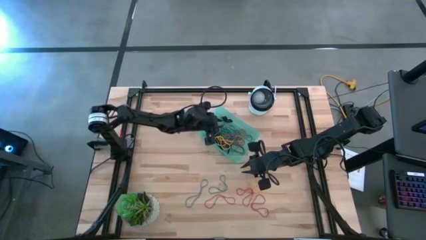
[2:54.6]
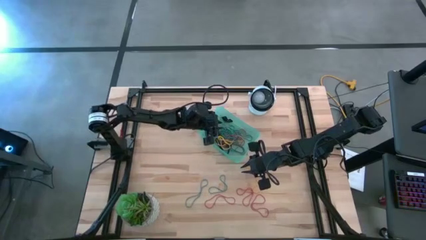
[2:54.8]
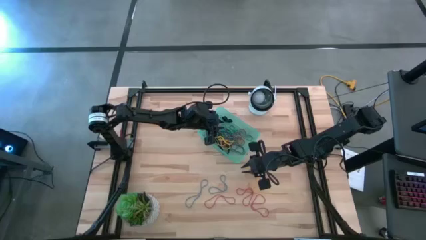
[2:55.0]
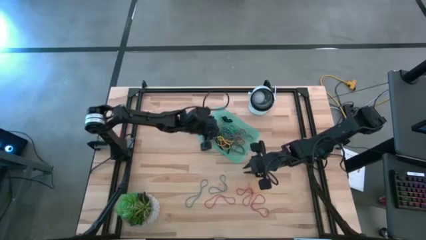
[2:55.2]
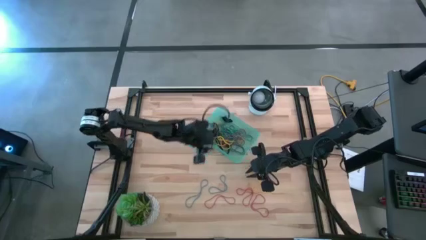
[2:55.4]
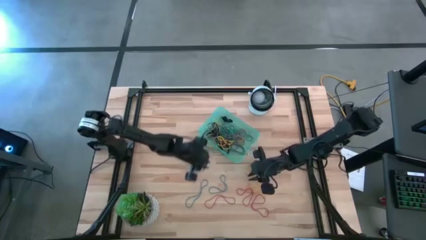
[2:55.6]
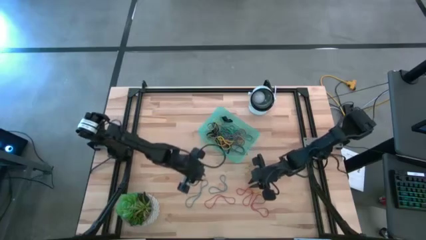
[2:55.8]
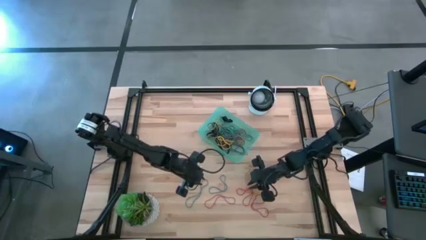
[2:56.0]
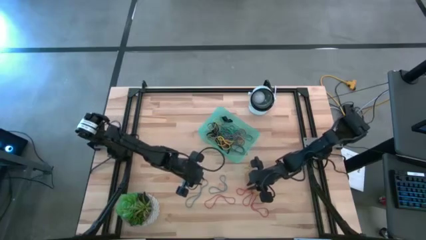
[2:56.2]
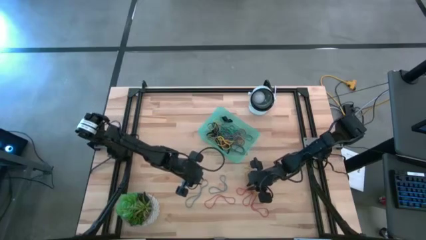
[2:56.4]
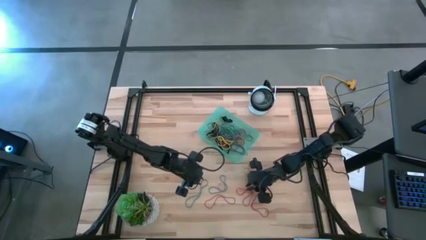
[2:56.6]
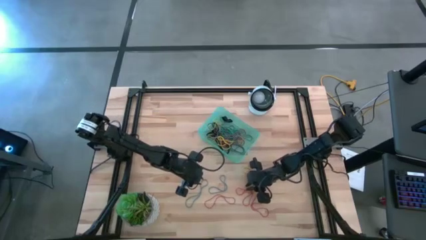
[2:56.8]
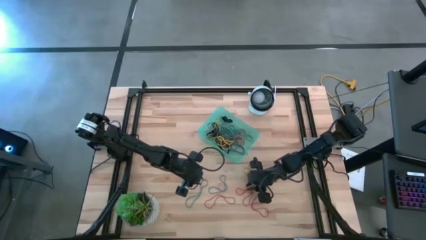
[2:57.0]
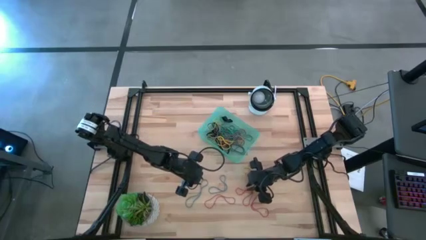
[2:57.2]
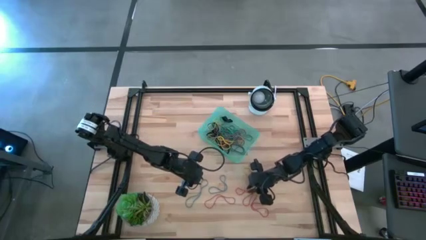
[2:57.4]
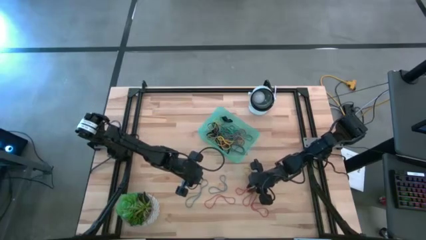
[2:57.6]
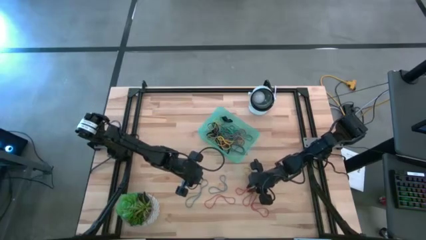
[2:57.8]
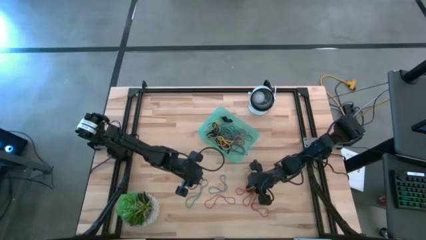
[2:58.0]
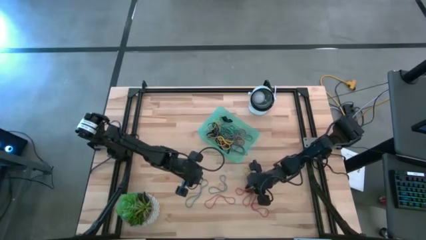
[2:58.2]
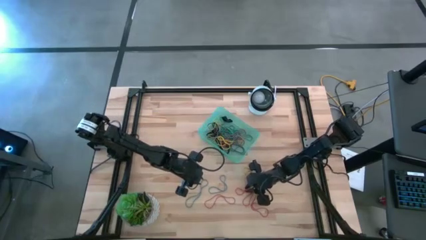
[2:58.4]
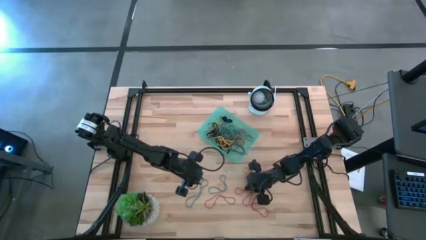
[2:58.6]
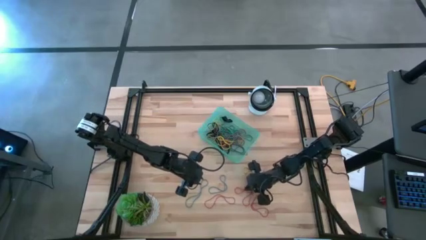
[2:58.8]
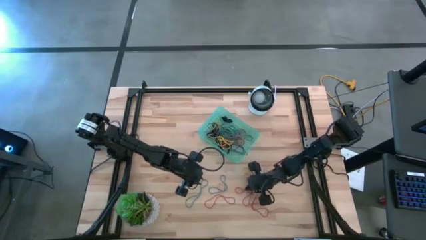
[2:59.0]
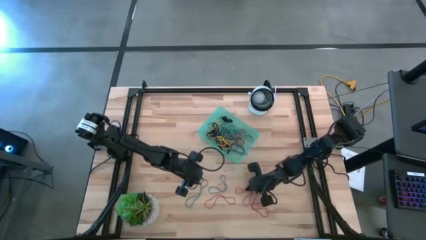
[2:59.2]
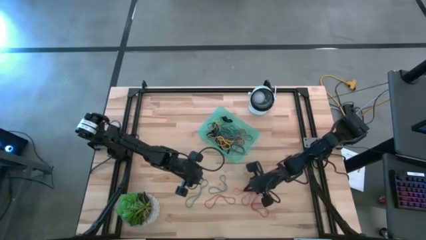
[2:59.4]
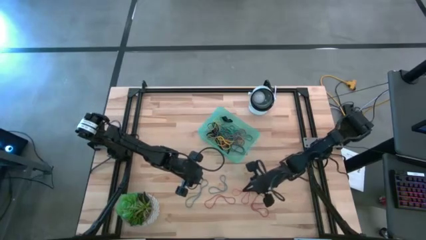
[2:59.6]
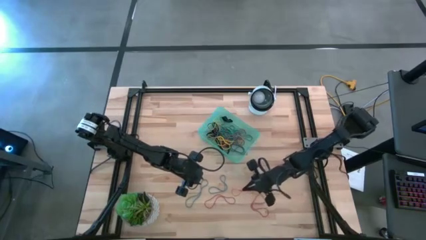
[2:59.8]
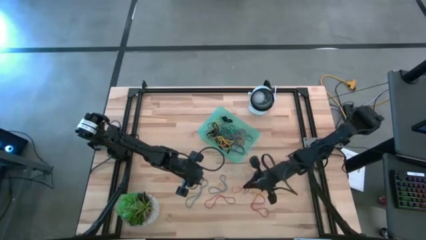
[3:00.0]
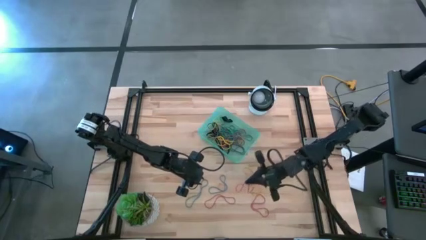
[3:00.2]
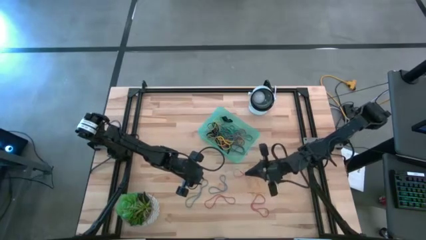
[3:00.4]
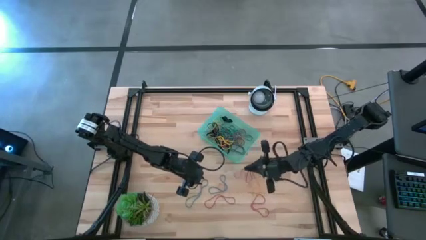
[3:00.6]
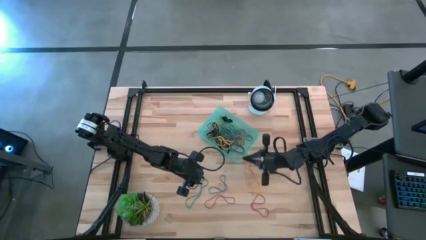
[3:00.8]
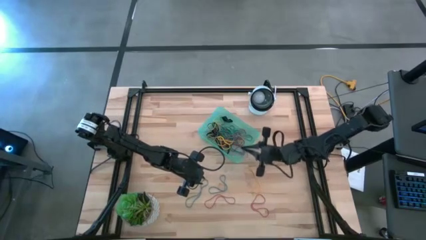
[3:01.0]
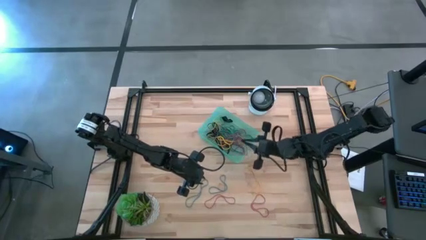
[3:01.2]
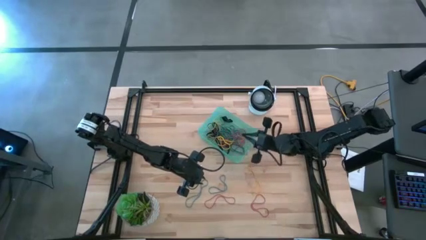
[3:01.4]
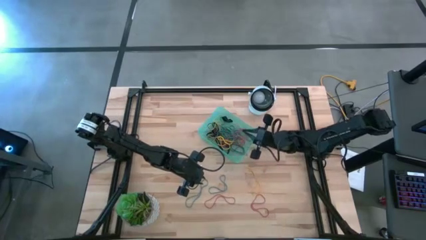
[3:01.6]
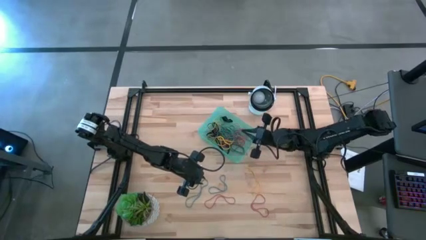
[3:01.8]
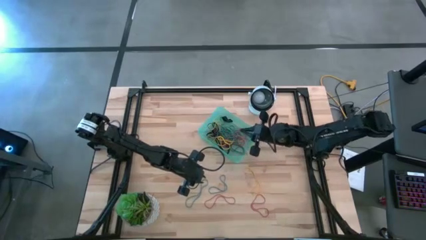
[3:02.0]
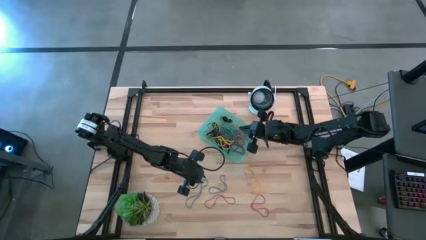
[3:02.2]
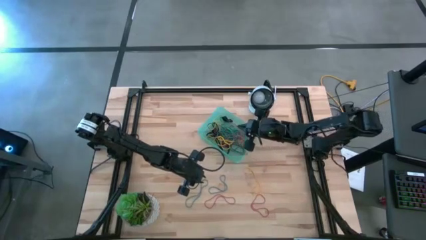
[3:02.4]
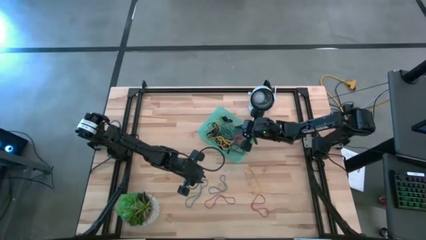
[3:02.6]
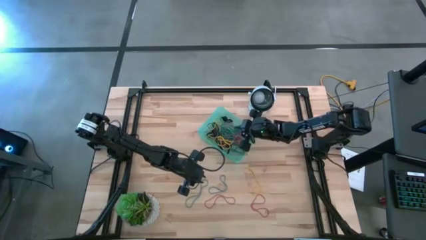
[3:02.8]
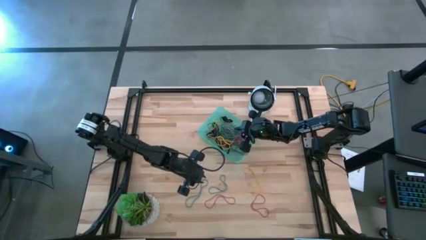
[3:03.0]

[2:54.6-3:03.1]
Task: Pick and place rubber bands into bin
Put the red rubber band into the blue bin

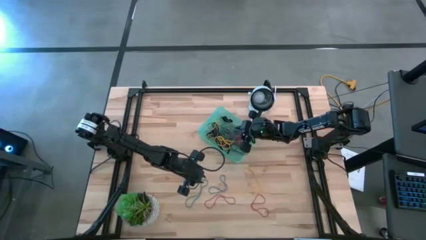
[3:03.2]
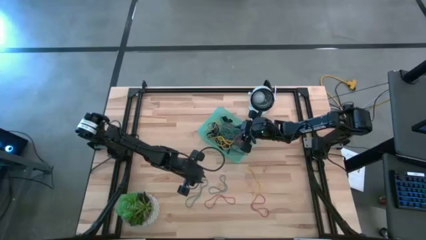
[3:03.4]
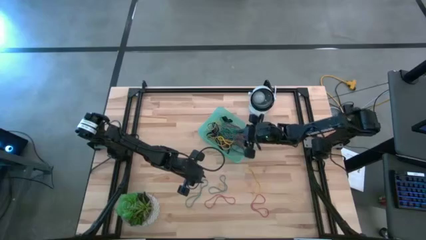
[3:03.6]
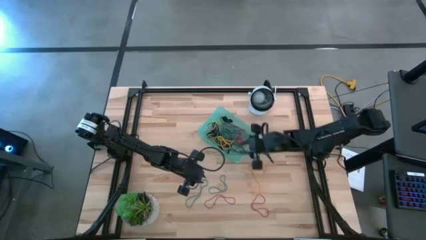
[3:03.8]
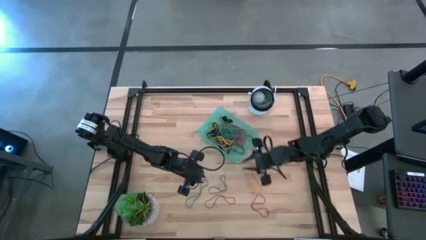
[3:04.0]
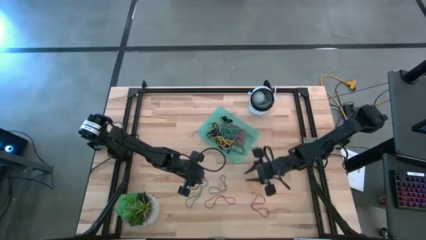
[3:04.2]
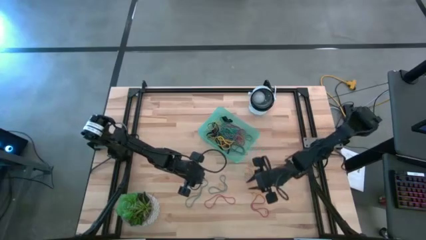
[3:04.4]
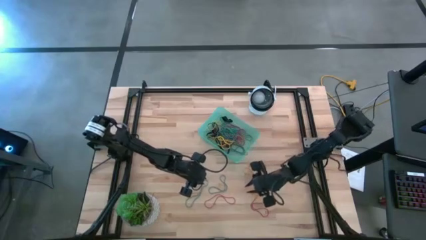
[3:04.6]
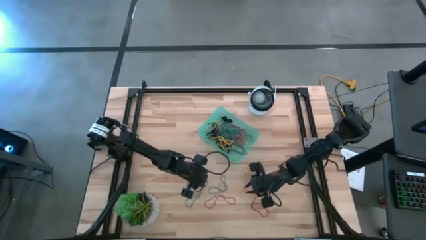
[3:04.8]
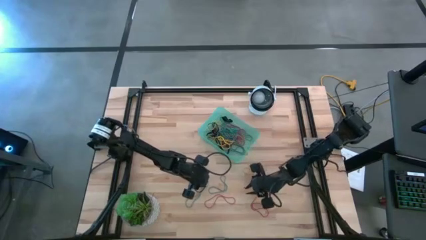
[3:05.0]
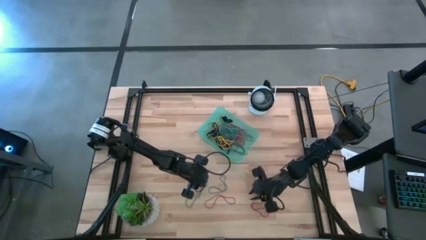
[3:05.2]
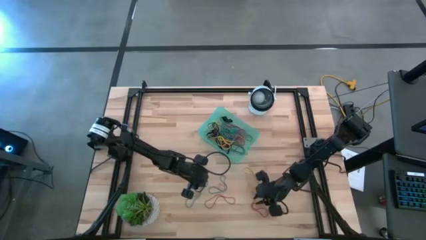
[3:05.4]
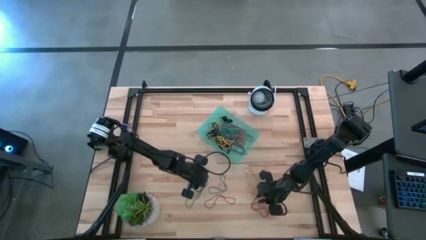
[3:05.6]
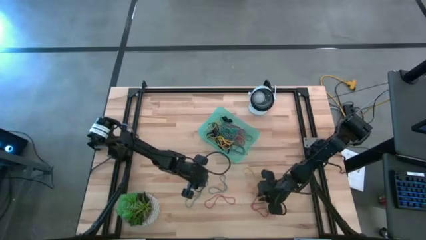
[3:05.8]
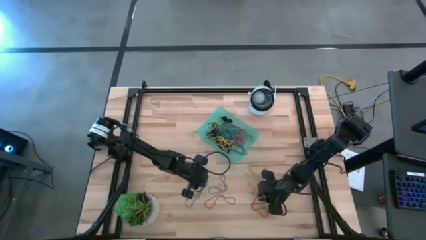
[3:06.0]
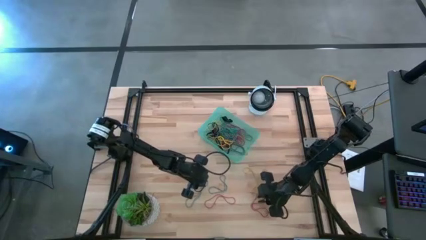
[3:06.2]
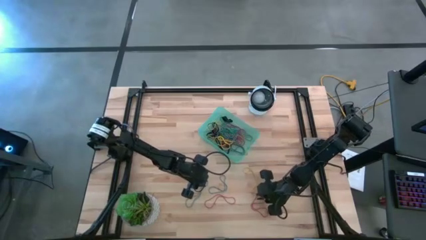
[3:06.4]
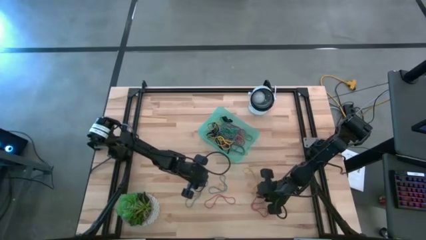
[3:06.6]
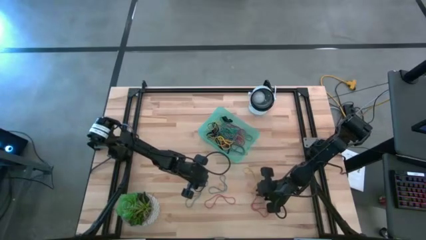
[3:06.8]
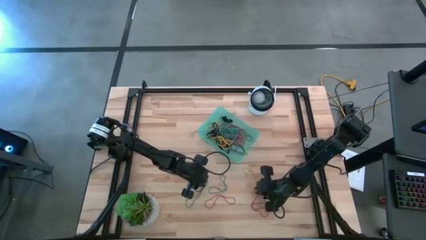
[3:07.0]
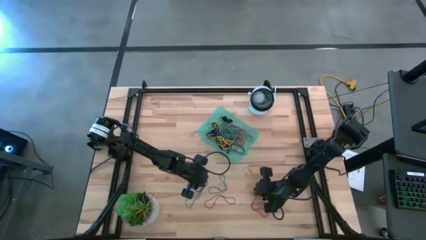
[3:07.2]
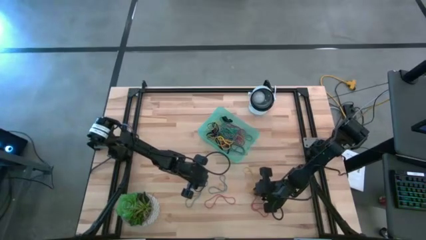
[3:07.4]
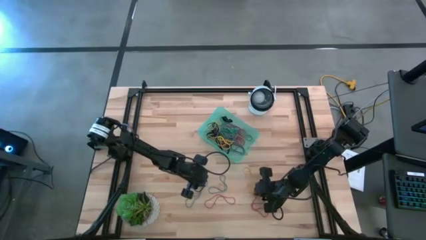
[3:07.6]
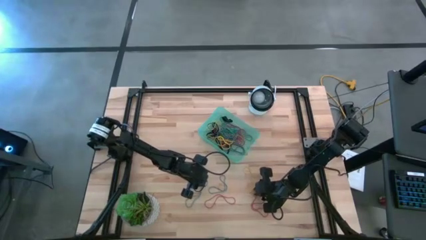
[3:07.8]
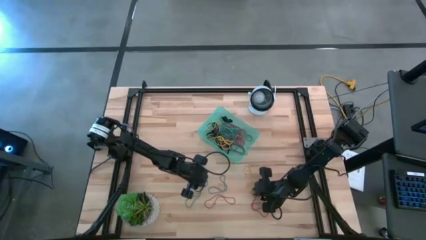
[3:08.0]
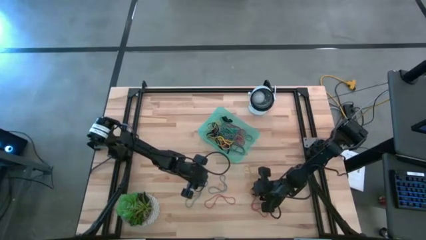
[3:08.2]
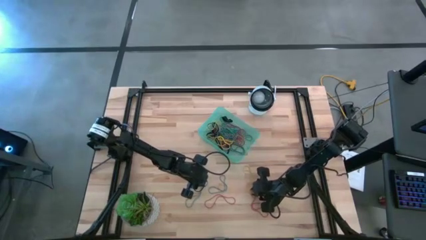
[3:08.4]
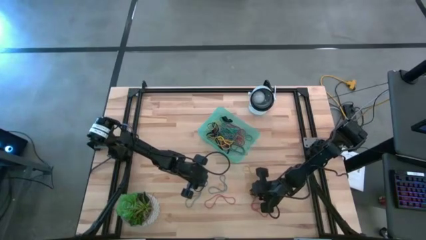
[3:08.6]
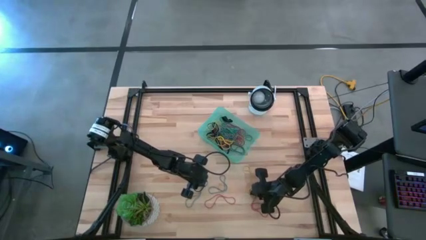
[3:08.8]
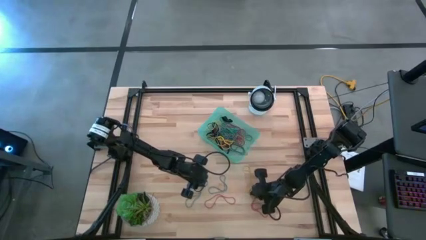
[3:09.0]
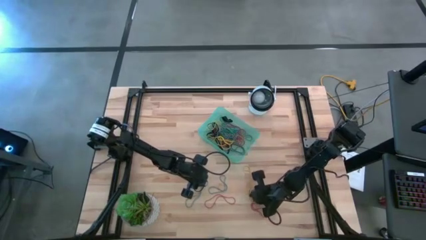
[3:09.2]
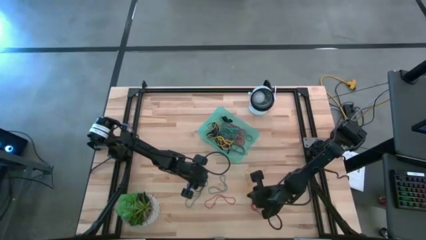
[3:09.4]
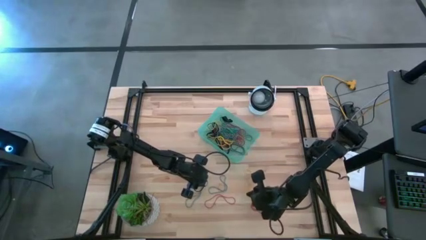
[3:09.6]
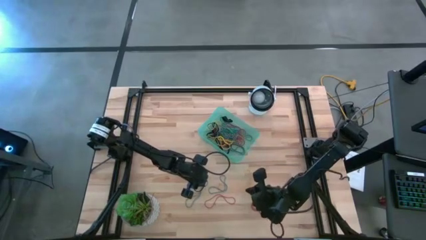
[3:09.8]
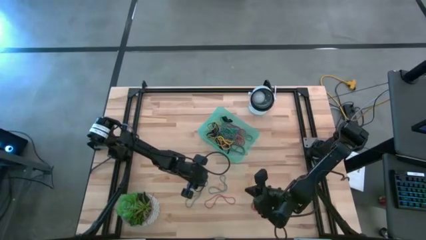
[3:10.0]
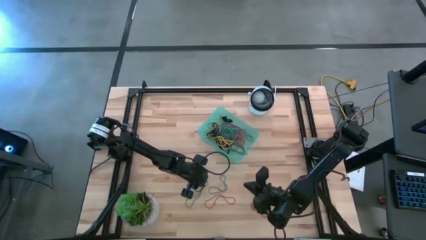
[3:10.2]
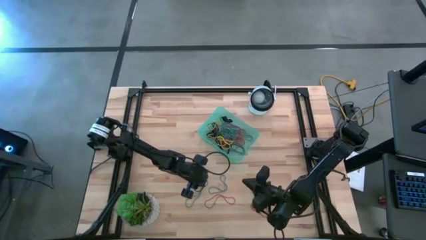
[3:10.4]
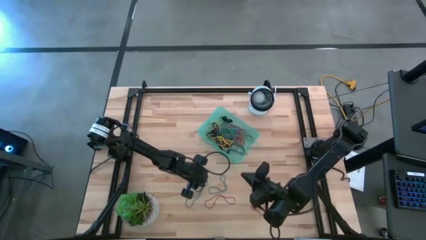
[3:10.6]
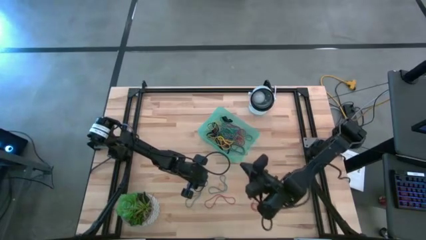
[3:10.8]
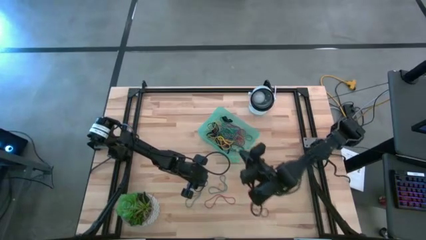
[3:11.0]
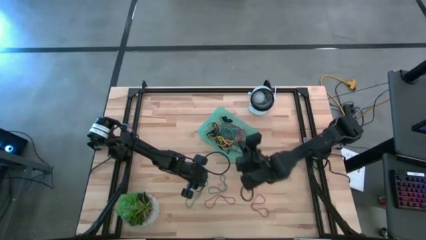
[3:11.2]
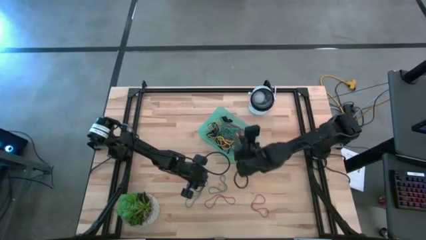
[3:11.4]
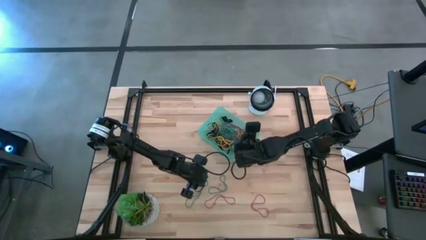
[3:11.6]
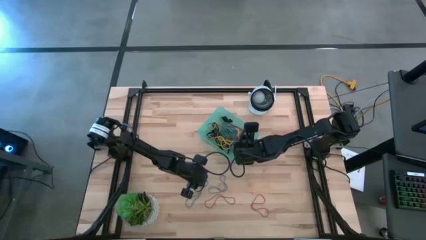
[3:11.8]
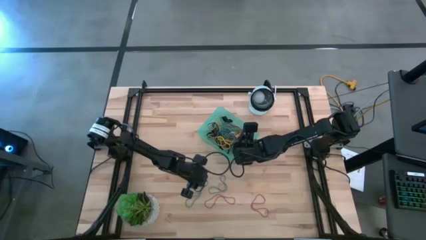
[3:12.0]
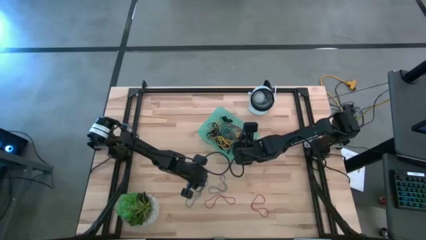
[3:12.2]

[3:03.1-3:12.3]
Put the yellow rubber band into the blue bin
